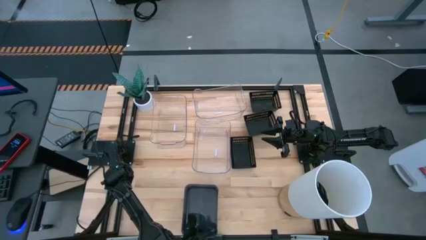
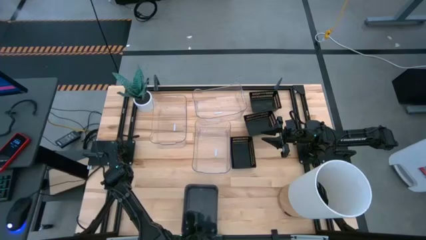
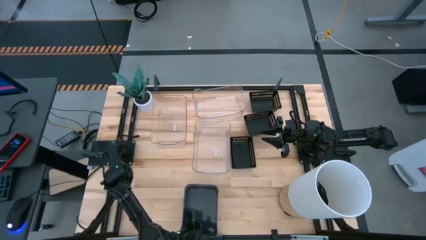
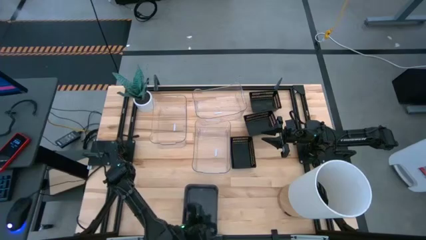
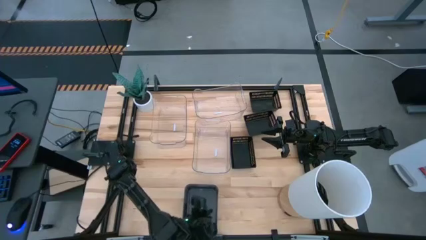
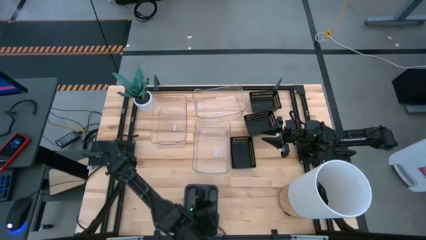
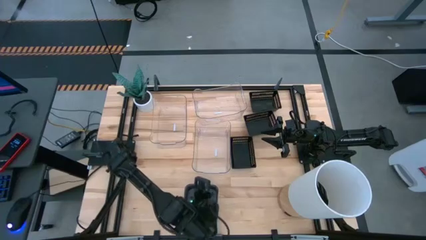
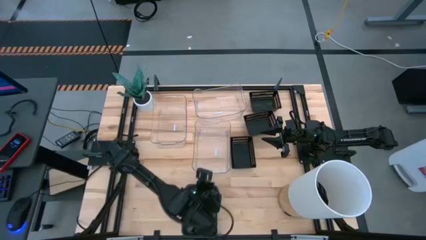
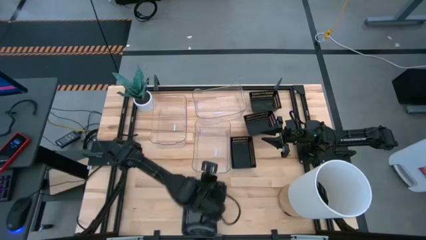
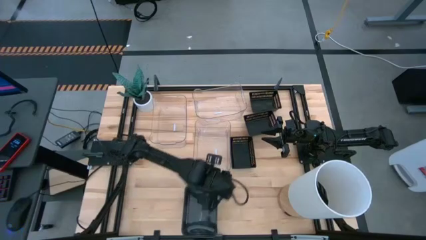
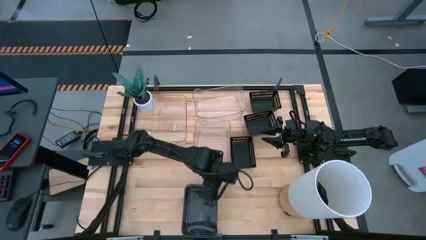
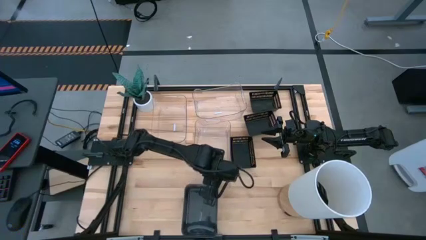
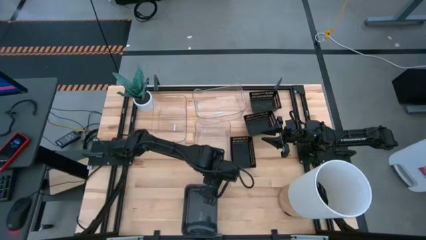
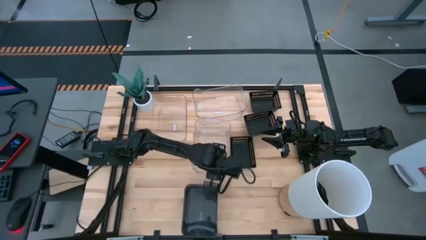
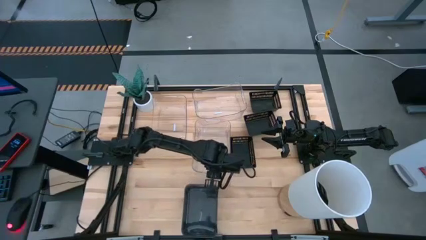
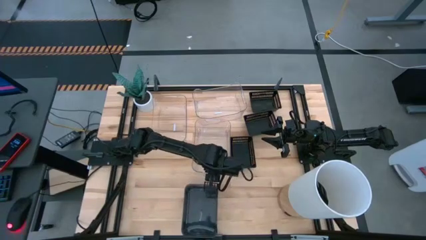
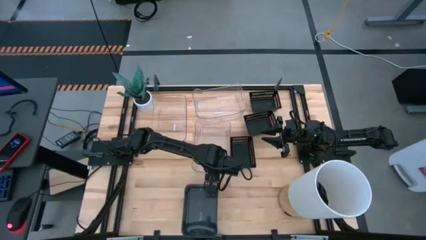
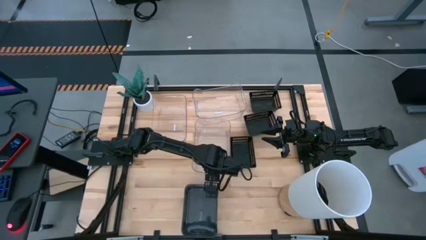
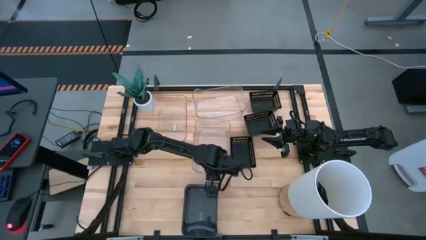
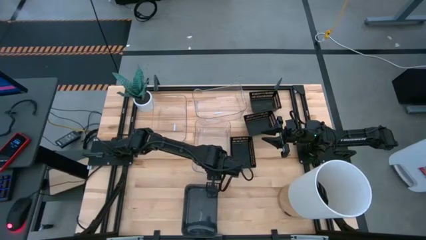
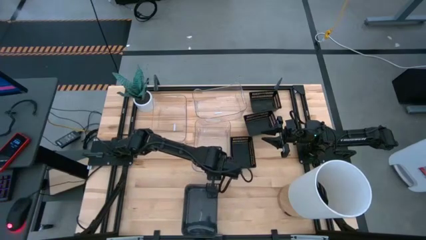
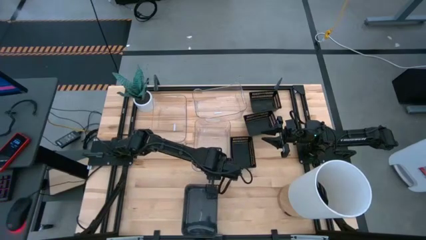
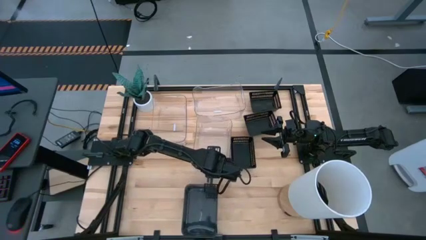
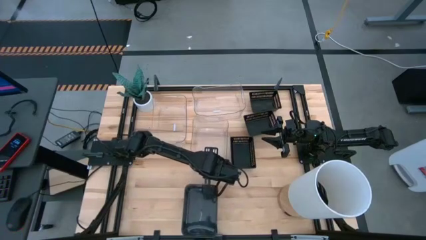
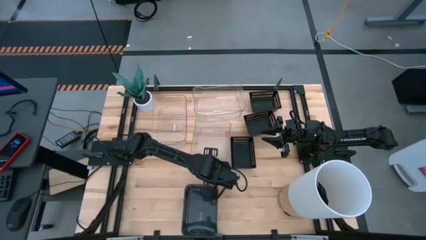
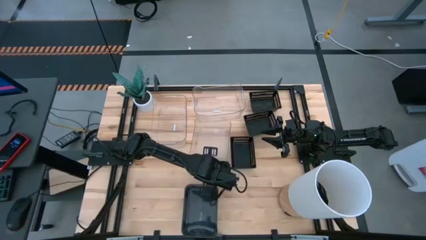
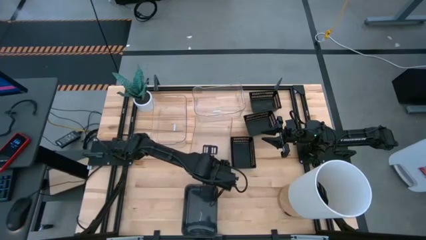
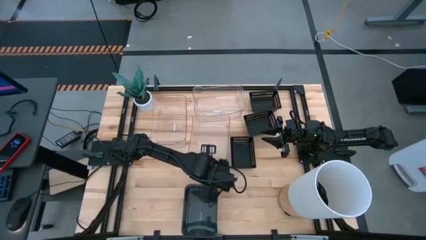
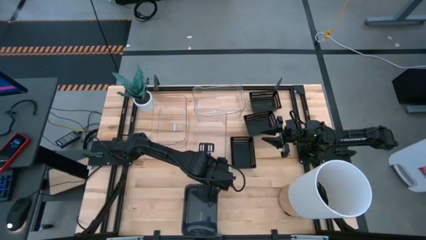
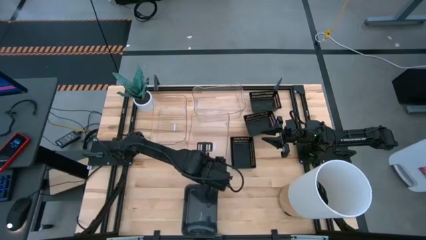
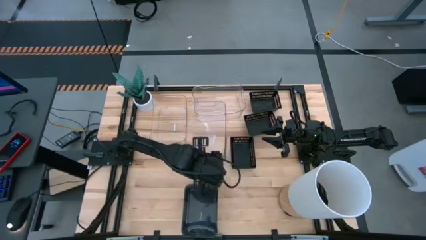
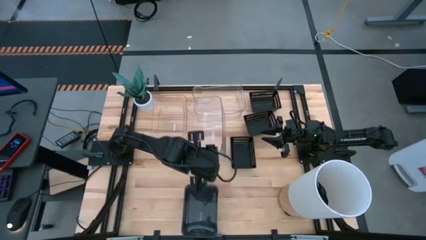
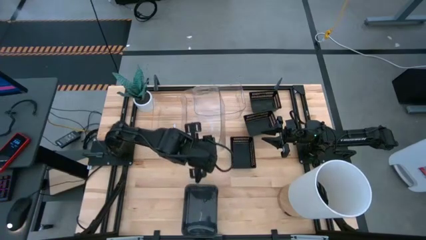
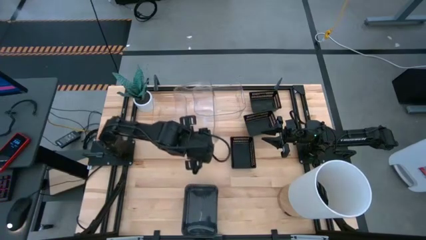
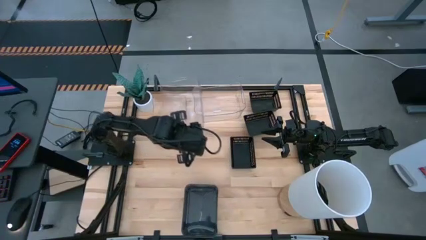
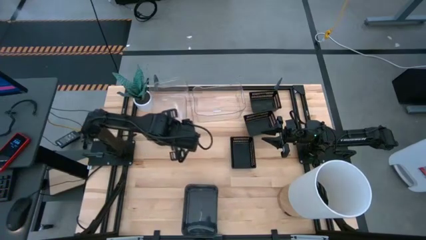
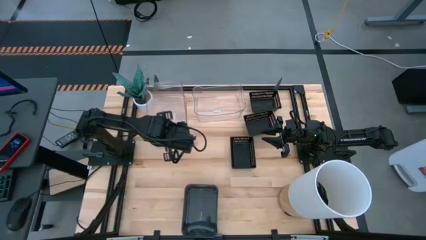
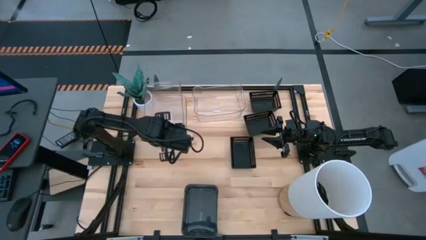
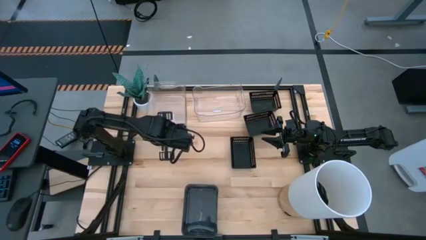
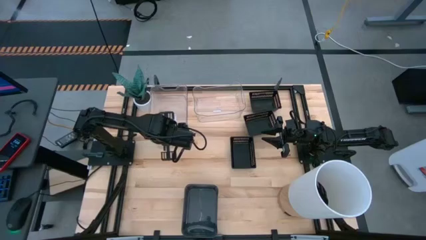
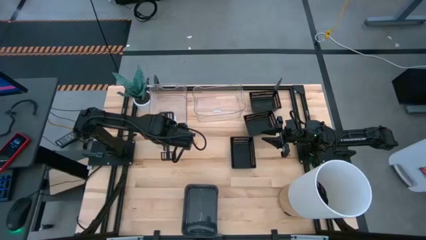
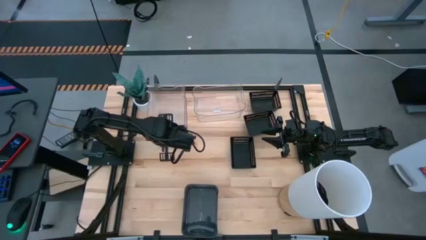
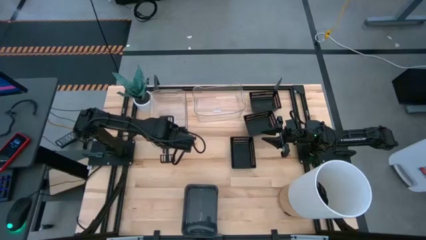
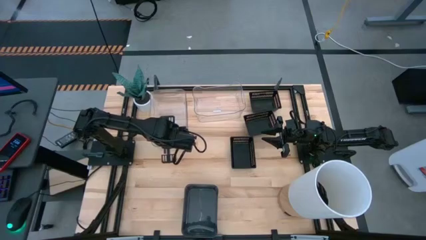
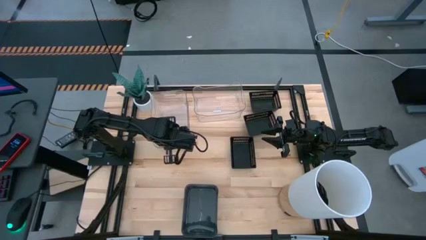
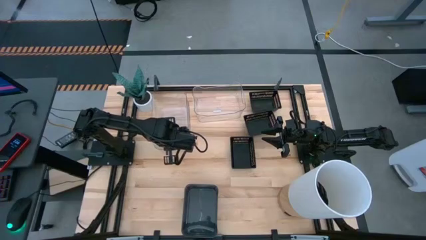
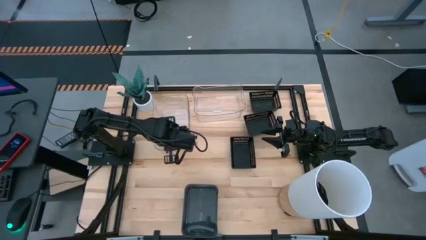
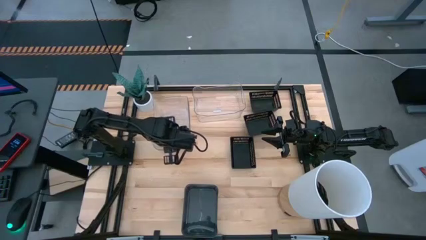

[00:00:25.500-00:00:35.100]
Stack the bottom transparent bin on top of the left transparent bin

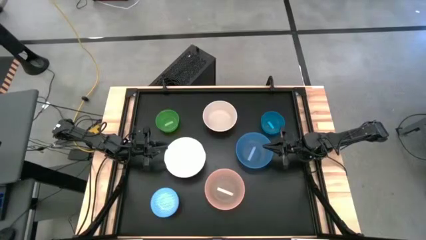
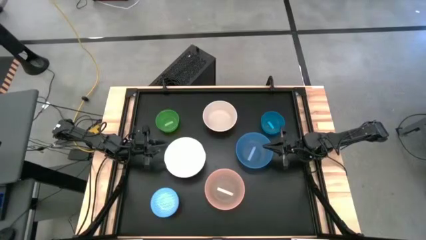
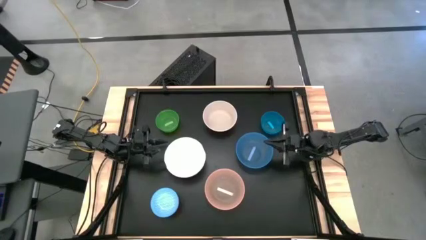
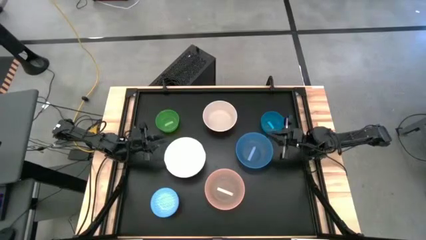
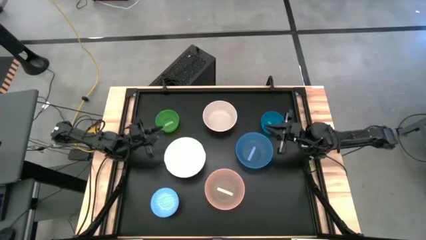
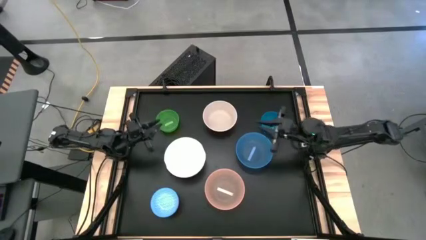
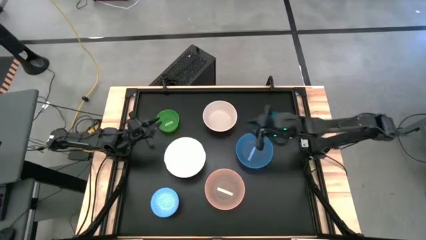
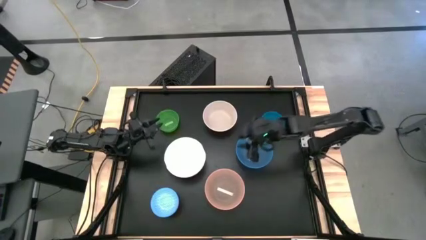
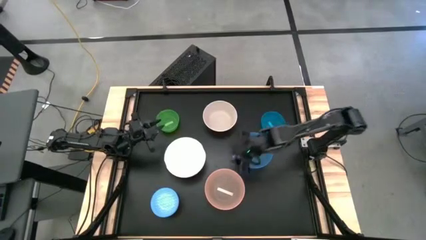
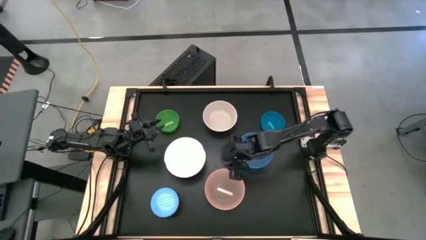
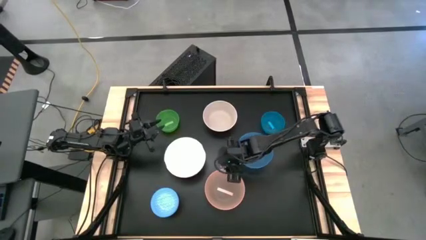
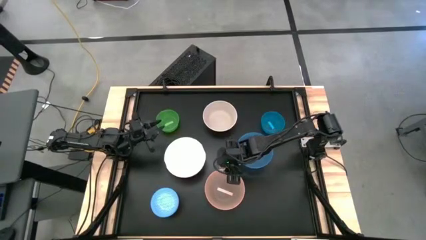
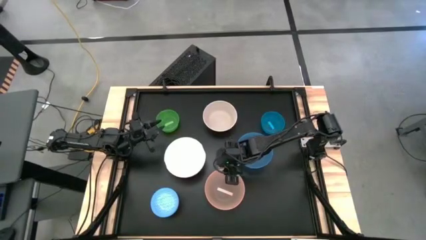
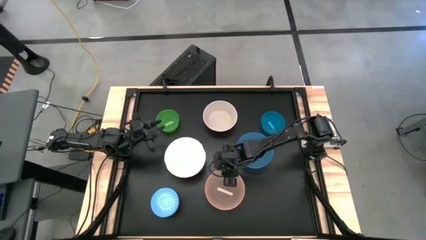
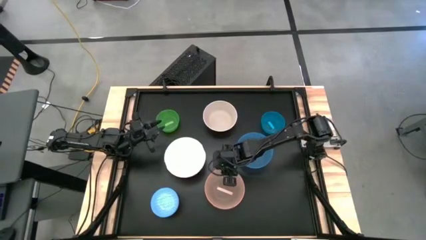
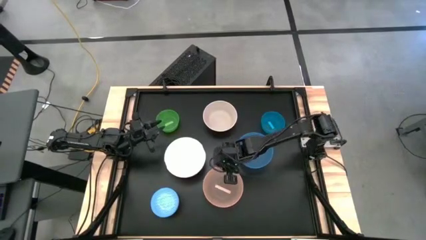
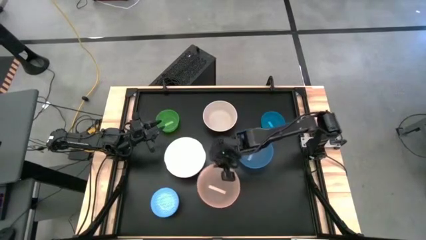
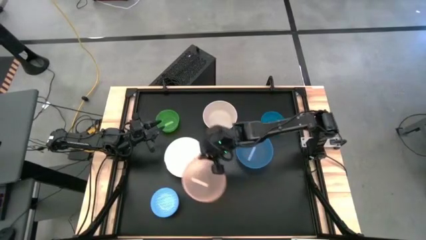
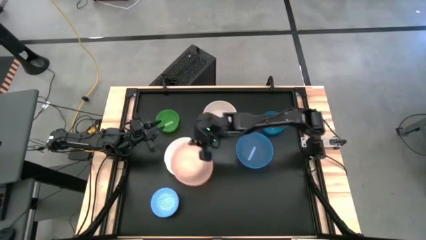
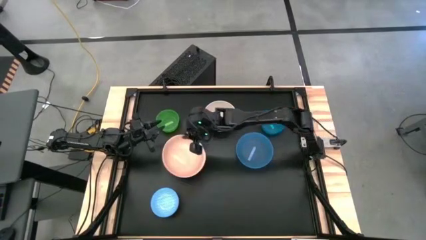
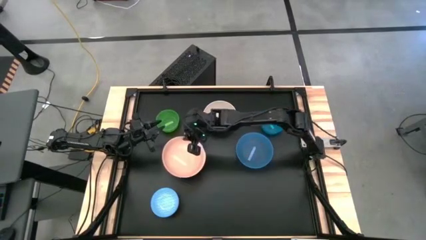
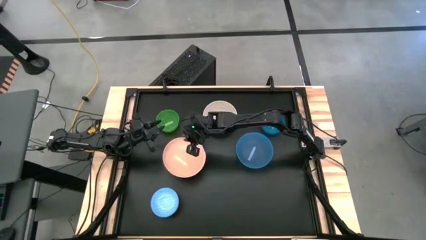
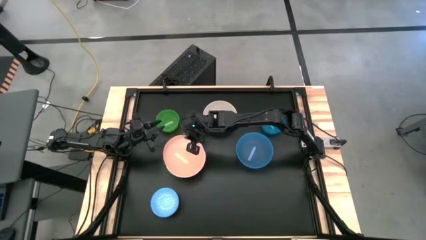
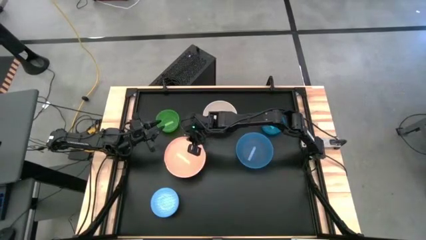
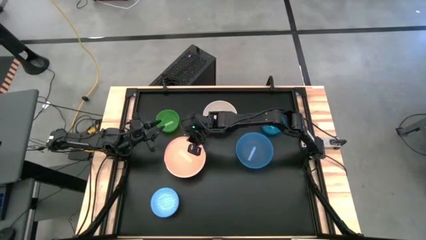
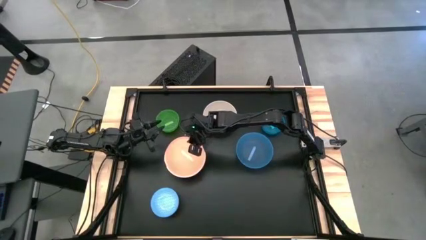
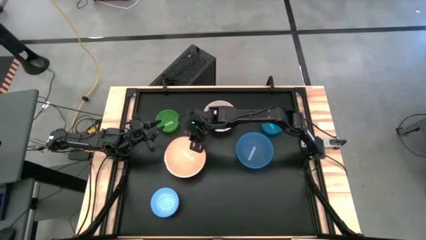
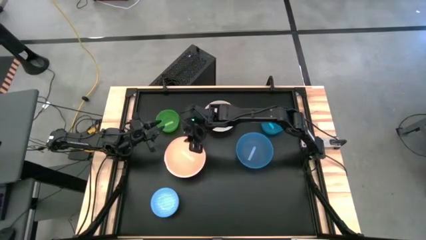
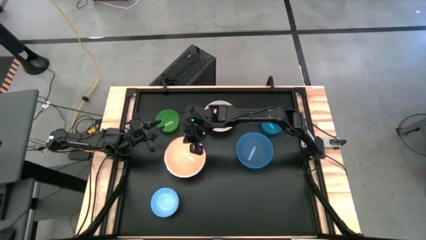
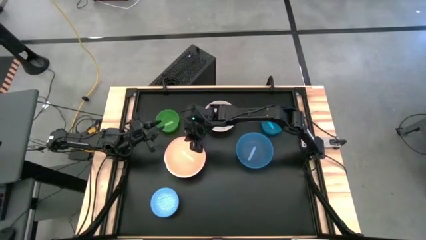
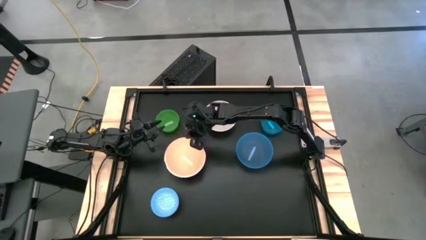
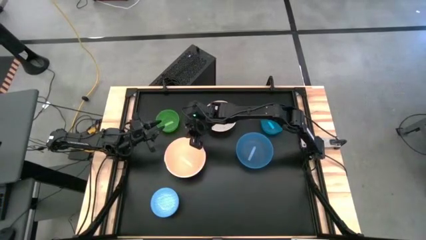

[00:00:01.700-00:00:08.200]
Stack the orange bowl on top of the bottom white bowl
